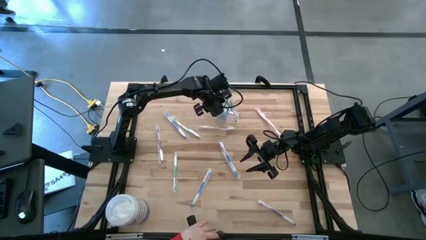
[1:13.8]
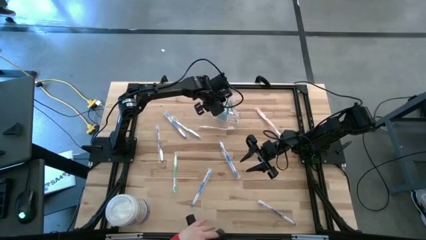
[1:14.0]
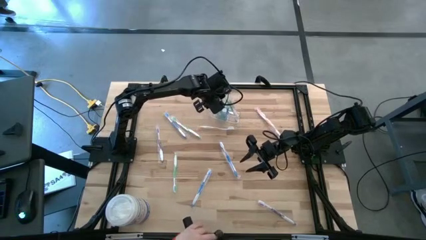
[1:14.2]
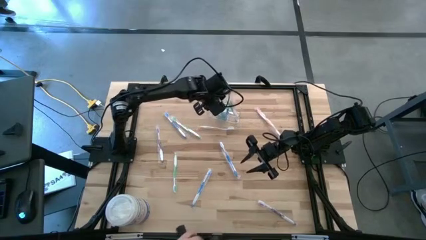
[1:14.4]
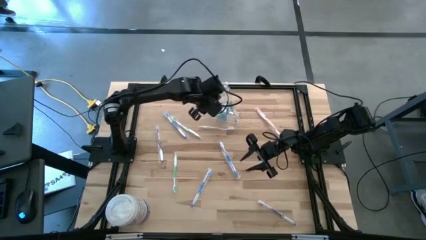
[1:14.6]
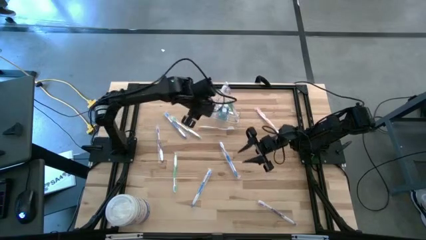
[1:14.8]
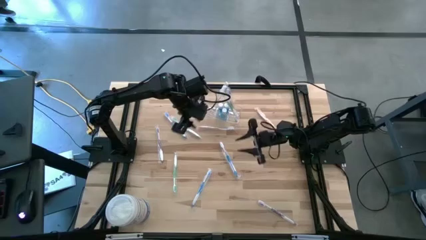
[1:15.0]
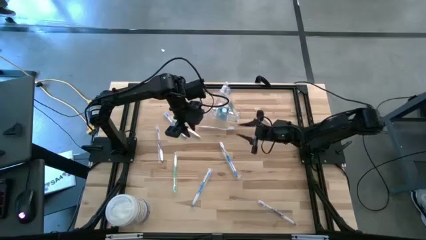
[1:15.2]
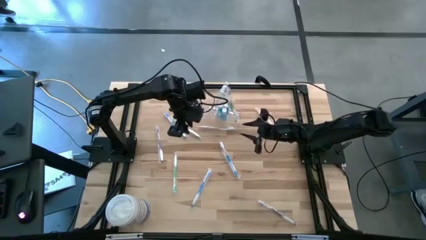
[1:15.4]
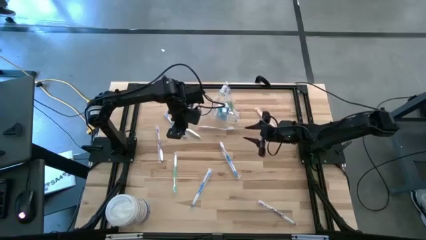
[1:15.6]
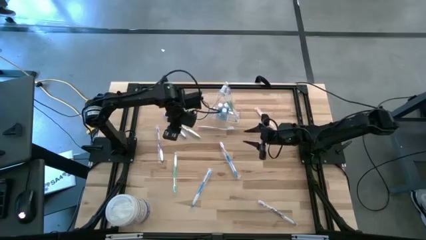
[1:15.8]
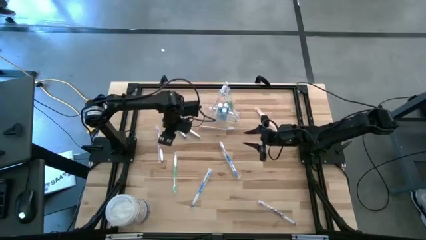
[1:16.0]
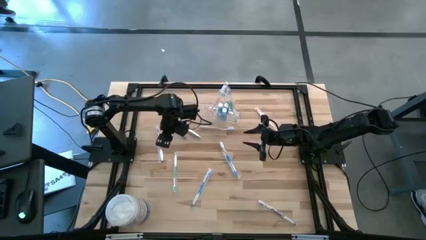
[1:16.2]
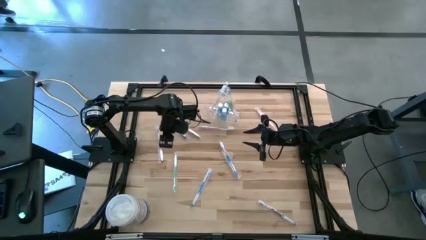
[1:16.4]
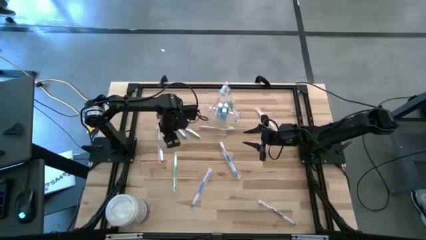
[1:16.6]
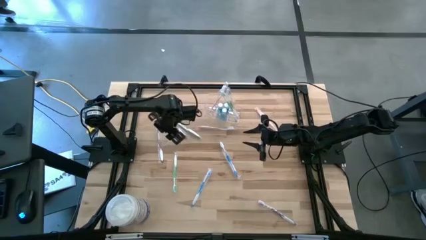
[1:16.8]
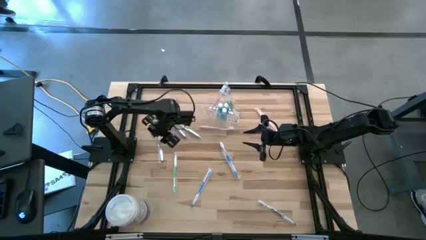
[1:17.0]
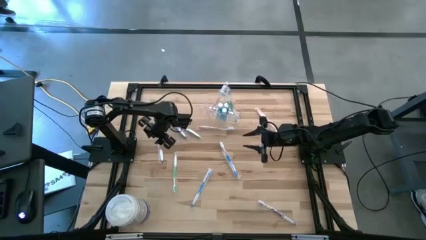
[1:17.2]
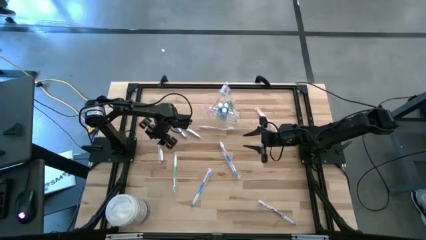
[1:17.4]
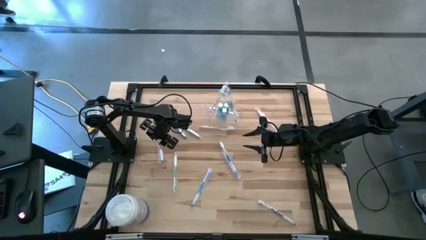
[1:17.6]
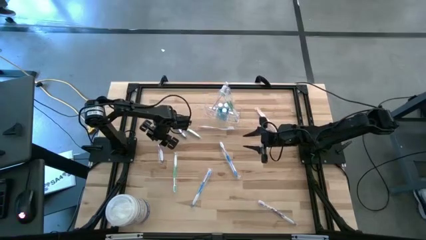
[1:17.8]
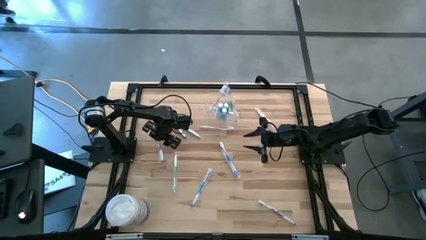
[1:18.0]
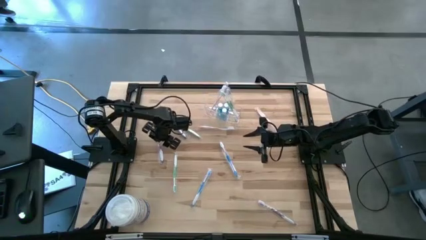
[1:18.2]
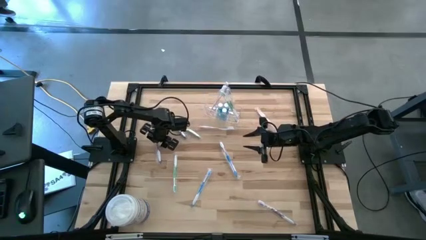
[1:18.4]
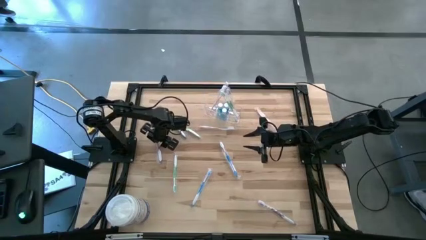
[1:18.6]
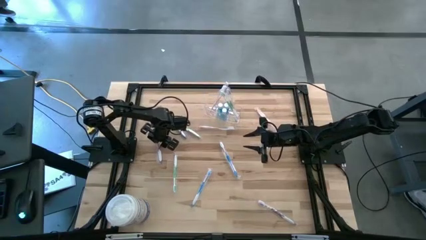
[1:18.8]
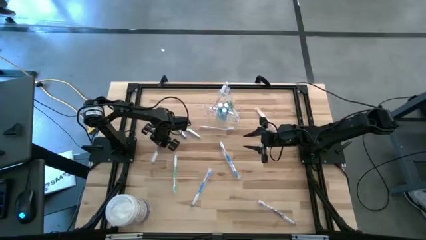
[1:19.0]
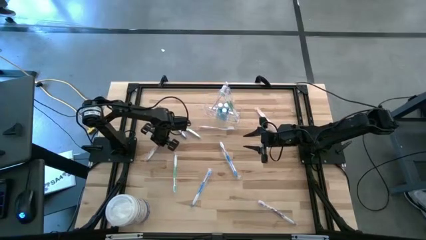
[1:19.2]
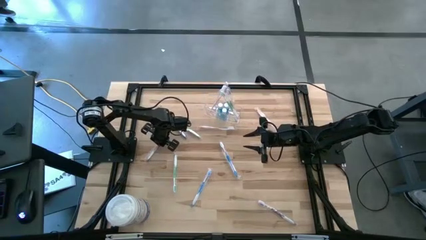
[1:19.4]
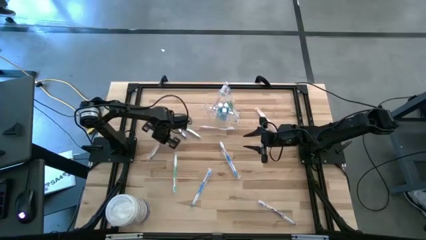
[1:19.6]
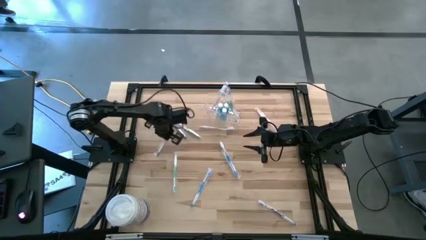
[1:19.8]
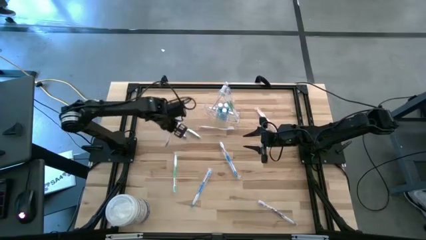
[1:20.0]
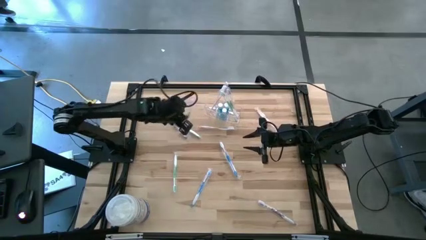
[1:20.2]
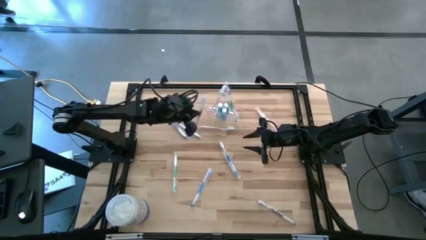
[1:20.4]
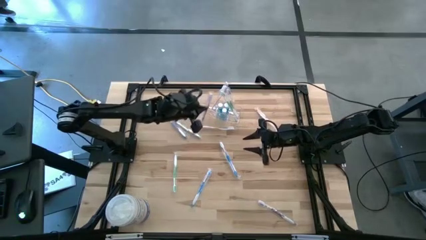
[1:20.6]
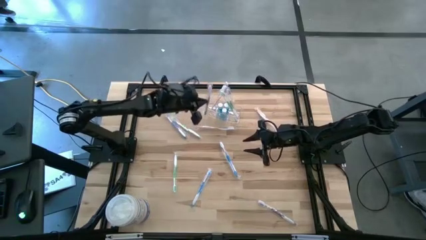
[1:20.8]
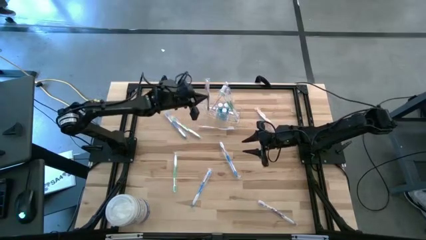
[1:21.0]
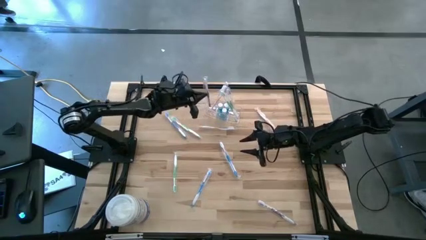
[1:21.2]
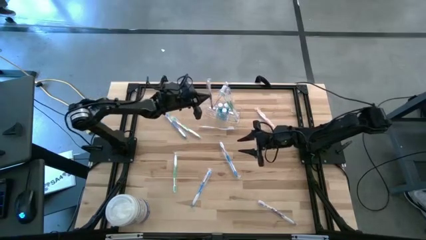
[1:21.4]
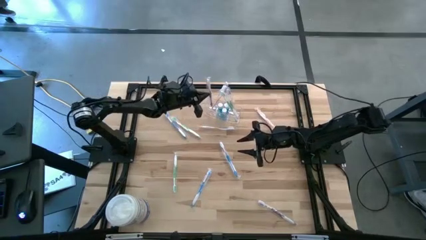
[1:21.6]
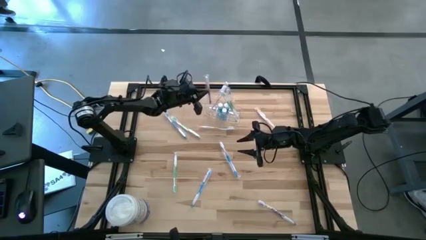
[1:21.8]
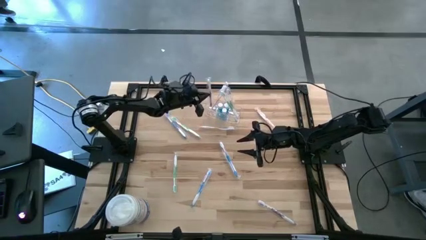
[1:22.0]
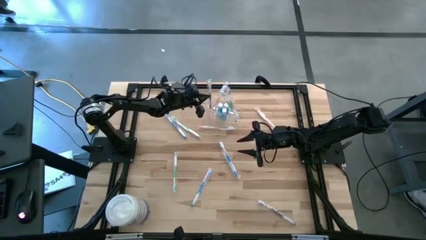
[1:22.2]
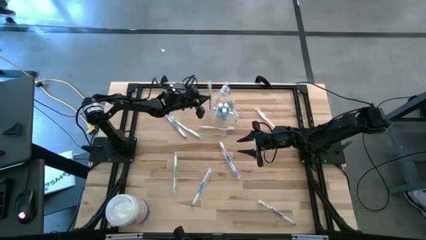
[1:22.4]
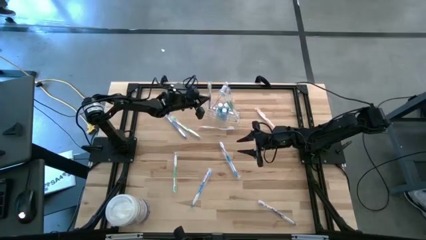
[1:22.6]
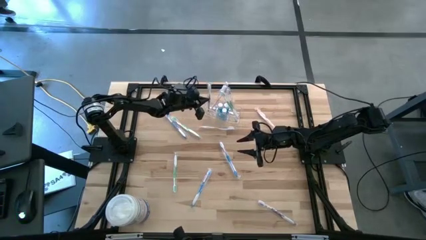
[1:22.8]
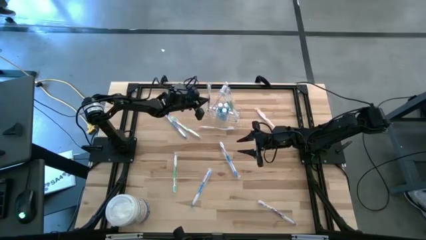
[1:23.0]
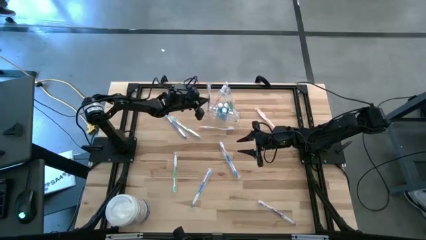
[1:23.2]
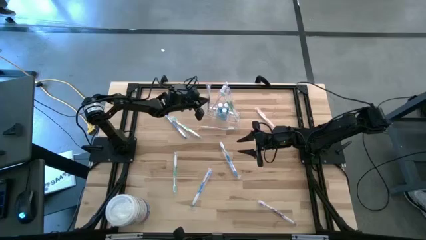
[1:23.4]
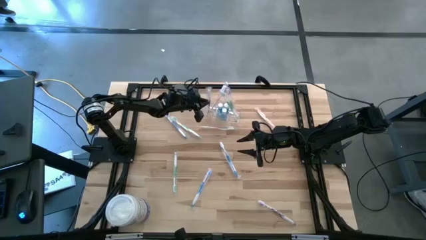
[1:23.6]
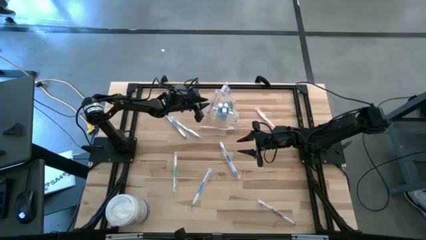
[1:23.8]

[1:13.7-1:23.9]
Task: Pick & Place toothbrushing station
Put the top violet toothbrush into the transparent organizer

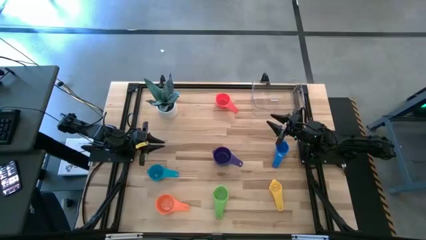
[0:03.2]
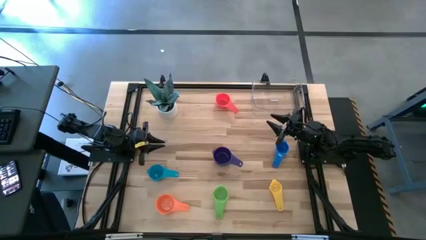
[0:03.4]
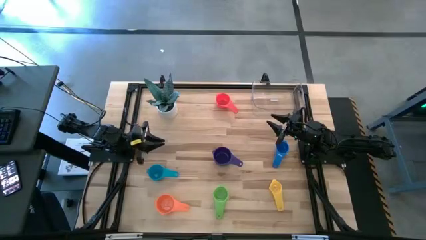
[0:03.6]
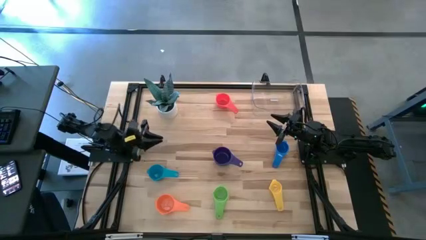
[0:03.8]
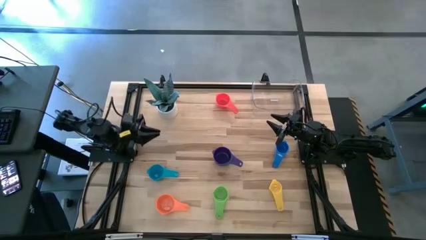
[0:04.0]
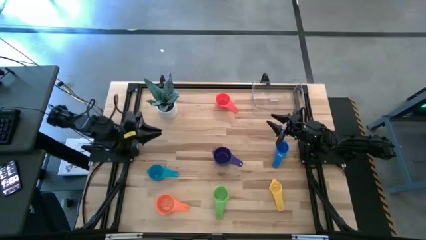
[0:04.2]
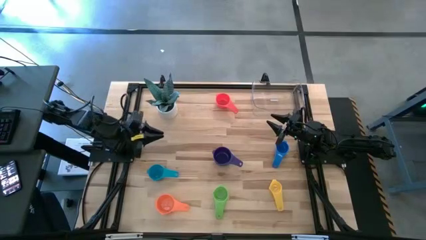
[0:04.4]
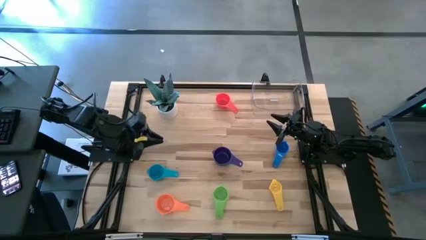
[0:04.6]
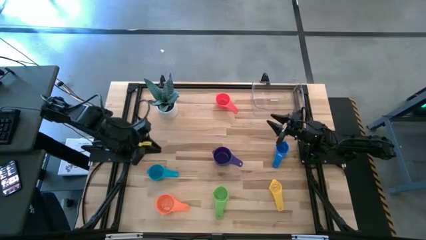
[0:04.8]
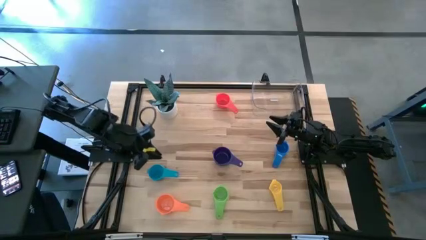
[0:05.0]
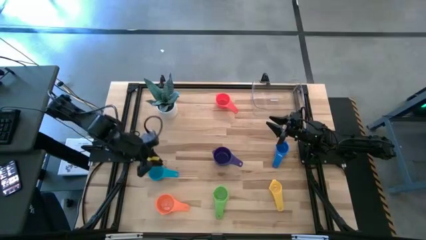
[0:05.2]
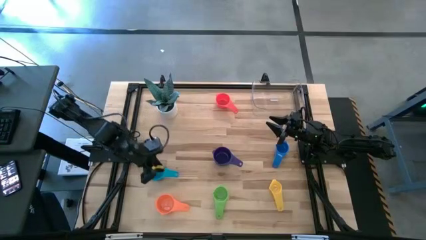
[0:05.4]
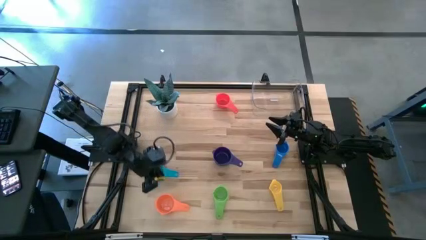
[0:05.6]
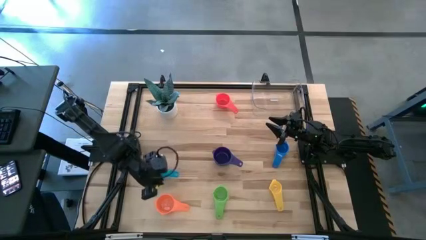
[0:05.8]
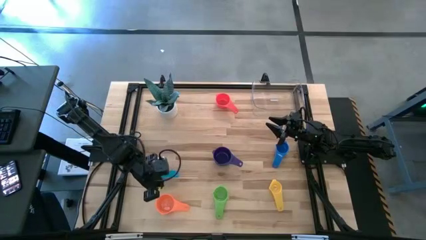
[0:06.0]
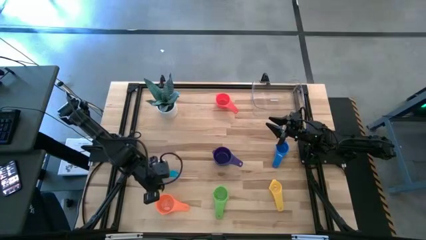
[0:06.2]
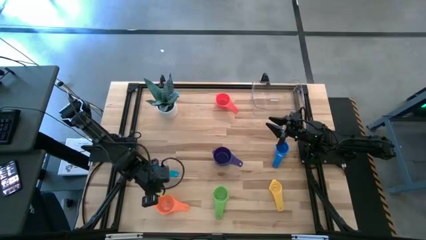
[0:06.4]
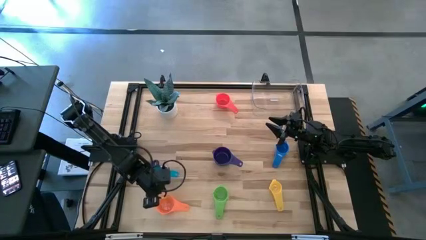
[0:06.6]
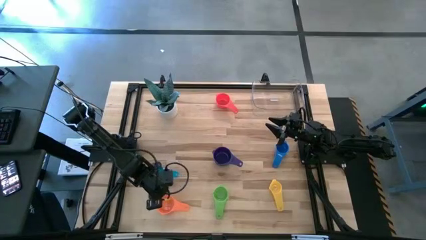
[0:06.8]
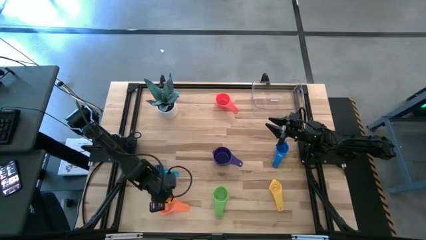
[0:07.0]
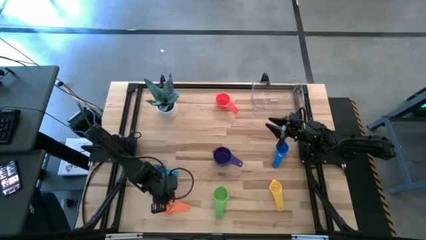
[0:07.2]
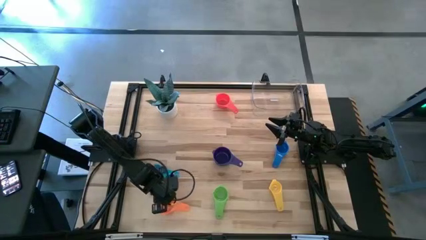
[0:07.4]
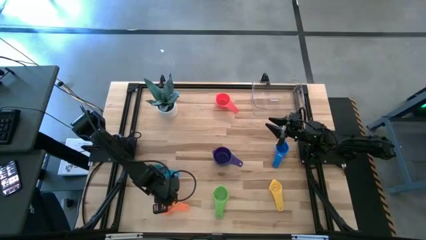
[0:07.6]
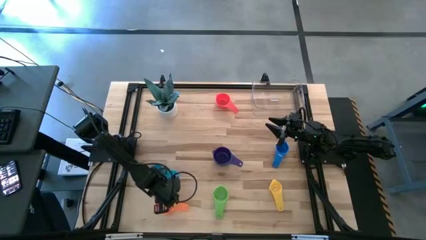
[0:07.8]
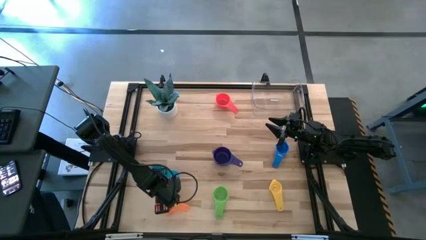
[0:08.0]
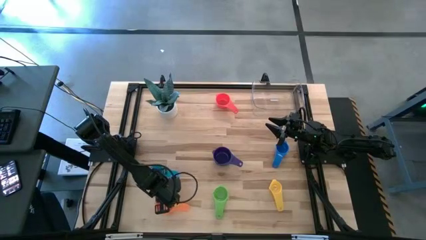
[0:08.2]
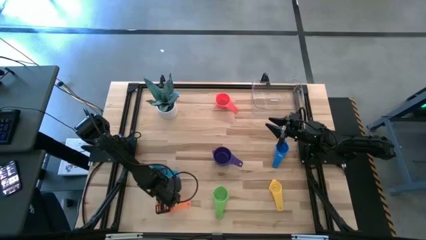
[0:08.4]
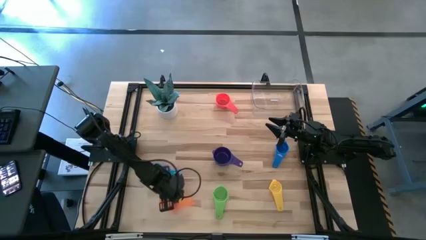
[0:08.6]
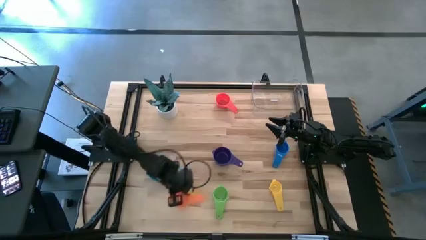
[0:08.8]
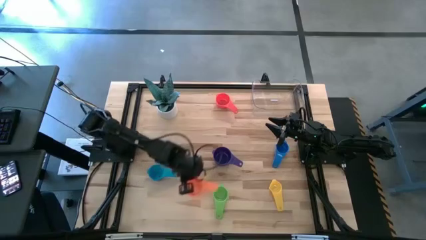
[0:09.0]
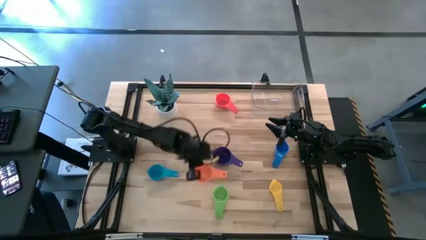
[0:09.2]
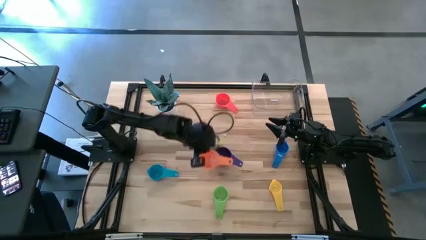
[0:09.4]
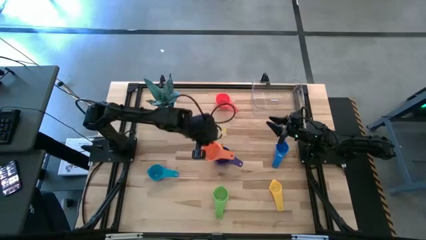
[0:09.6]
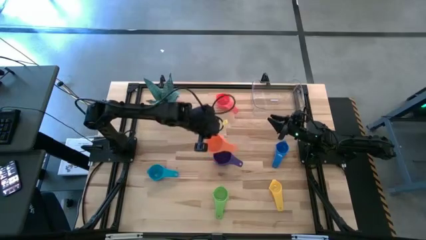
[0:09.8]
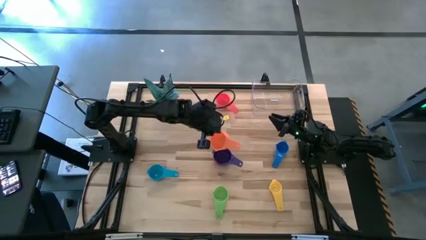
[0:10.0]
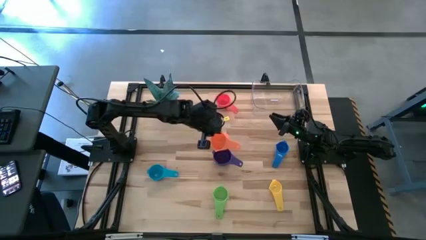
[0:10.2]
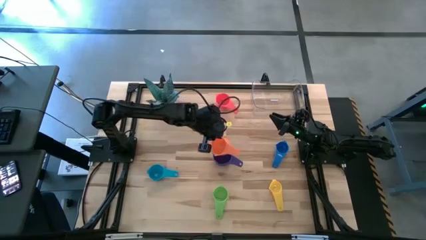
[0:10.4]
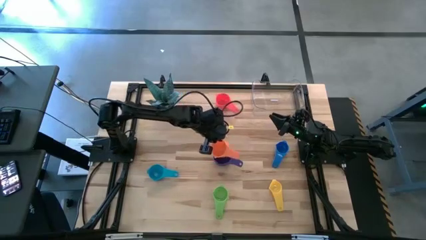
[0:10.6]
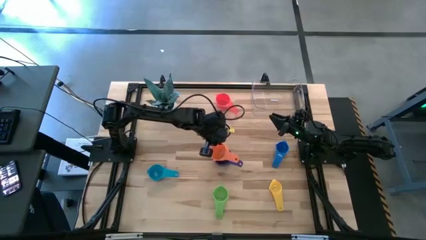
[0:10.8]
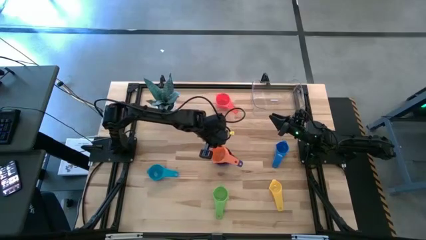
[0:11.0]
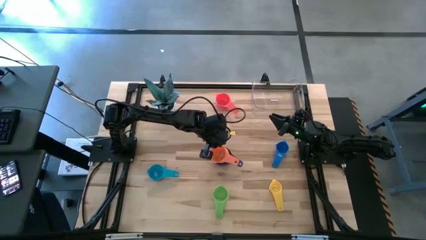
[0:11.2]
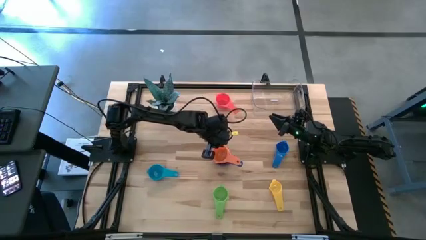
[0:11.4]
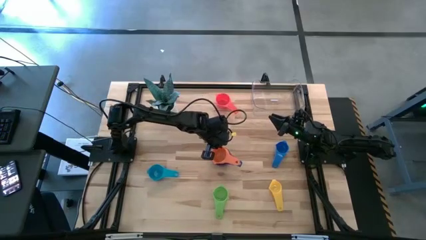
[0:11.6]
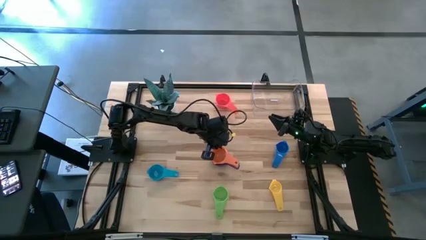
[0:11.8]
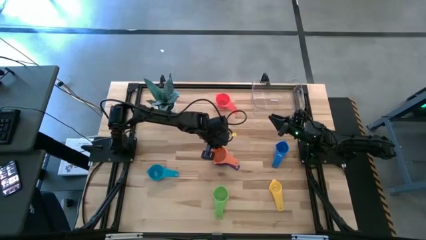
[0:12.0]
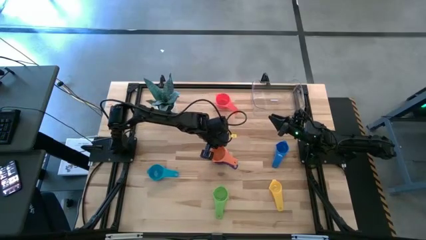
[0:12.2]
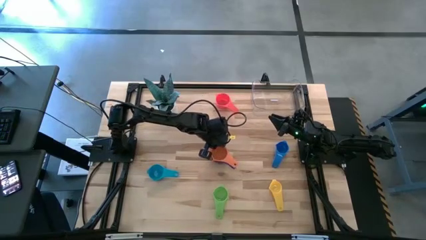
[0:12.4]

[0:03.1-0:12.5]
Task: Nest measuring cups in basket
Stack the orange measuring cup on top of the violet measuring cup
